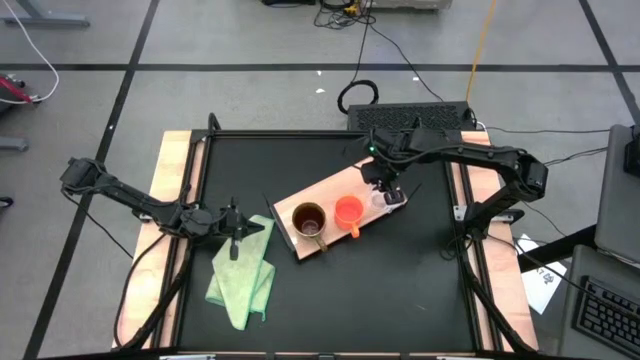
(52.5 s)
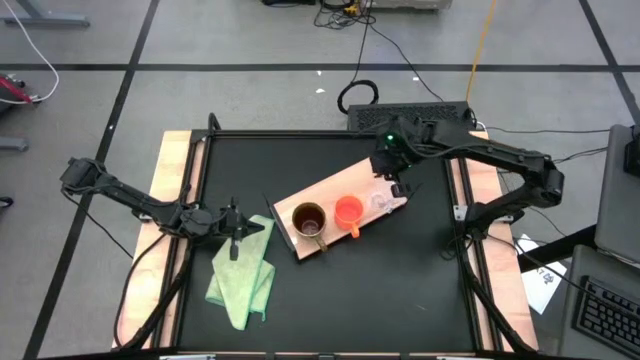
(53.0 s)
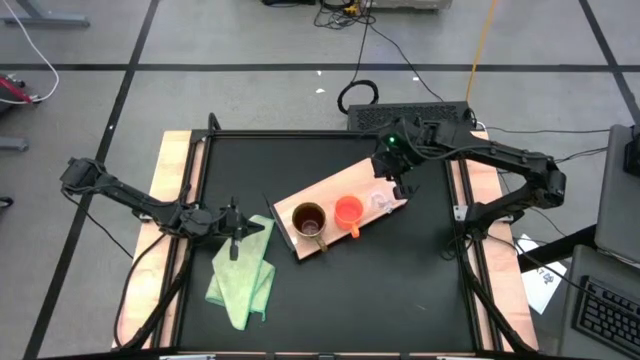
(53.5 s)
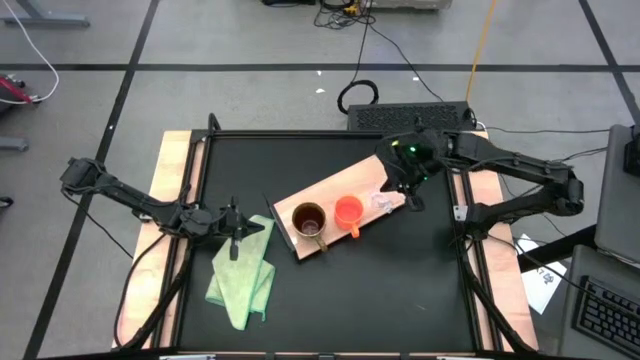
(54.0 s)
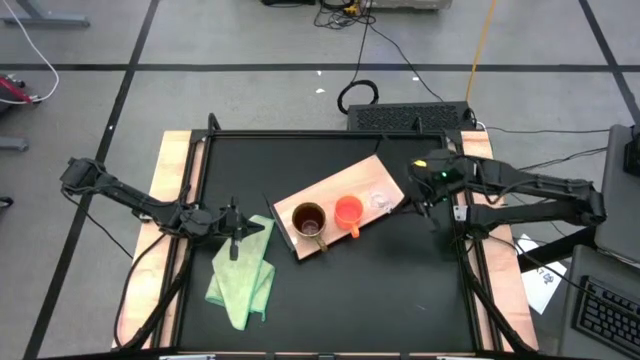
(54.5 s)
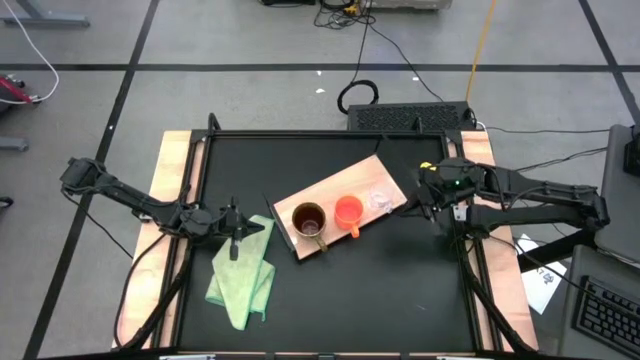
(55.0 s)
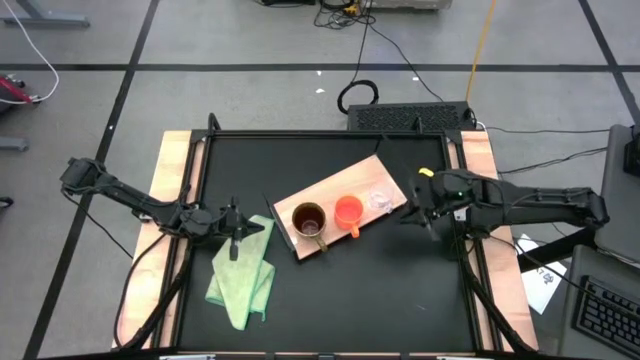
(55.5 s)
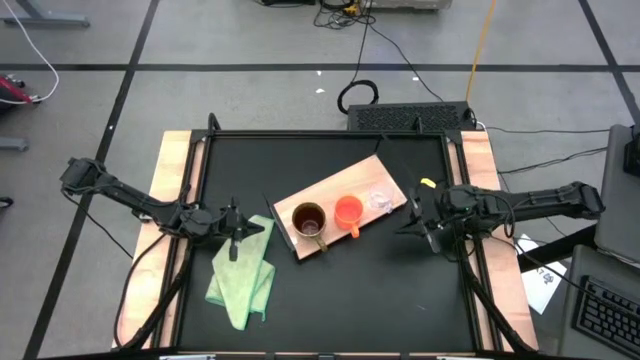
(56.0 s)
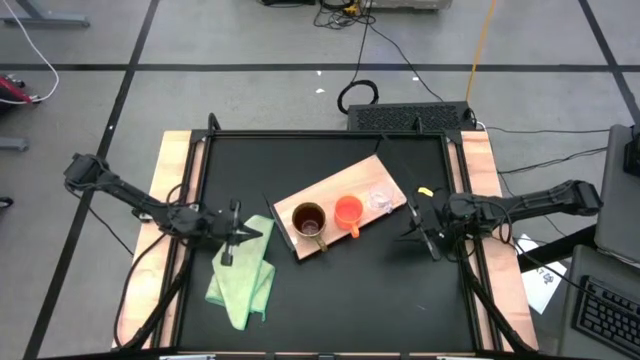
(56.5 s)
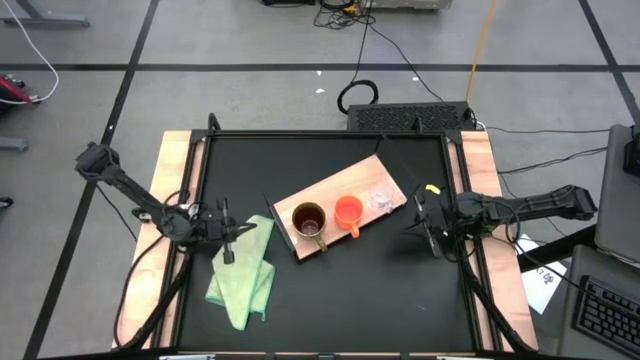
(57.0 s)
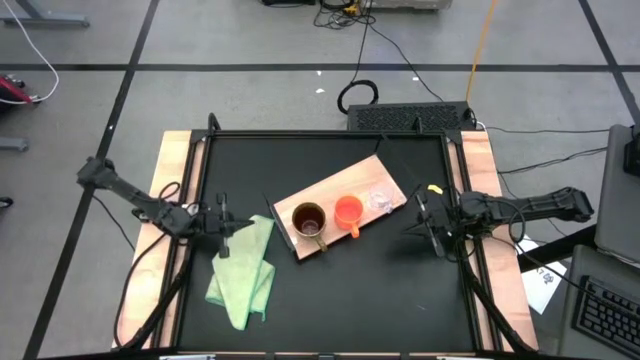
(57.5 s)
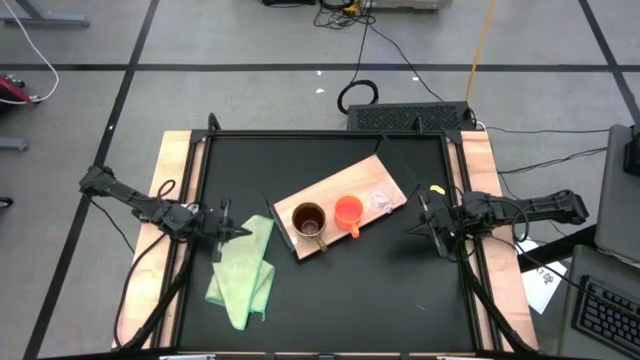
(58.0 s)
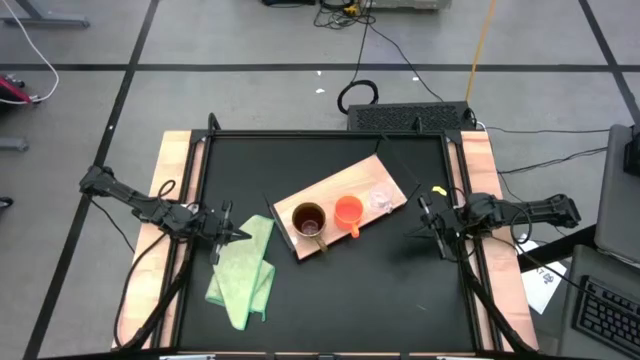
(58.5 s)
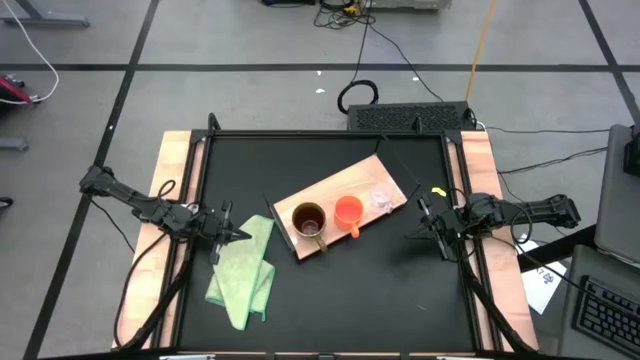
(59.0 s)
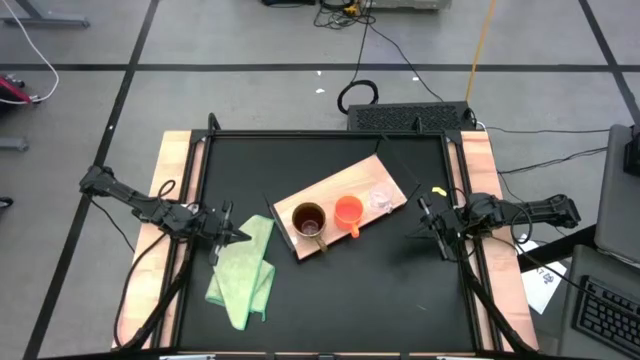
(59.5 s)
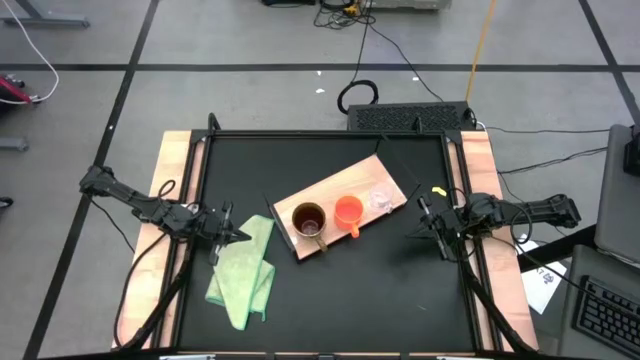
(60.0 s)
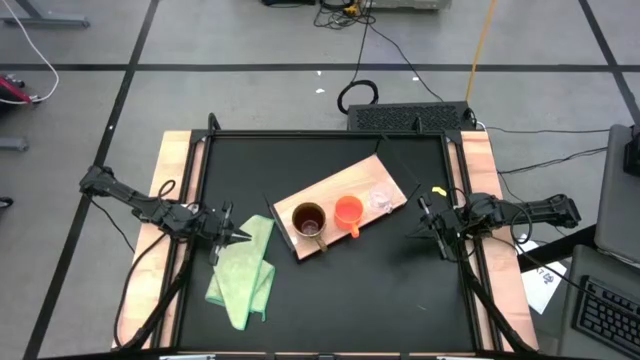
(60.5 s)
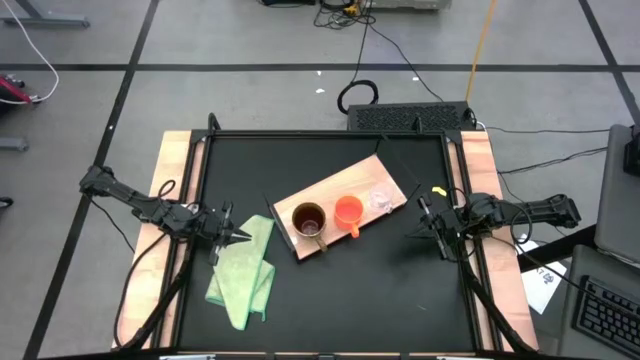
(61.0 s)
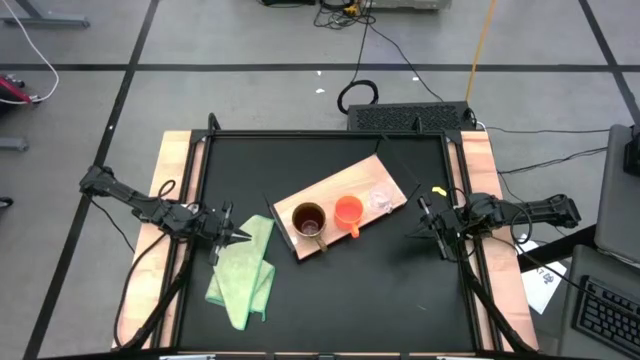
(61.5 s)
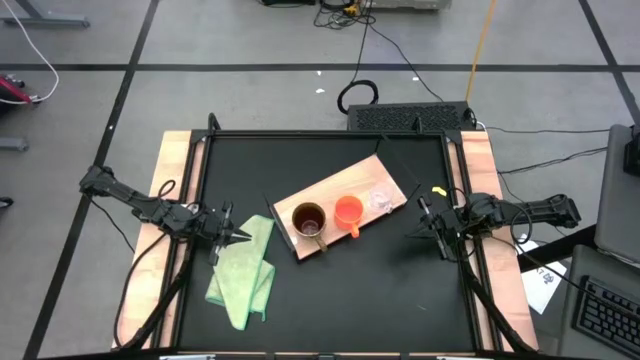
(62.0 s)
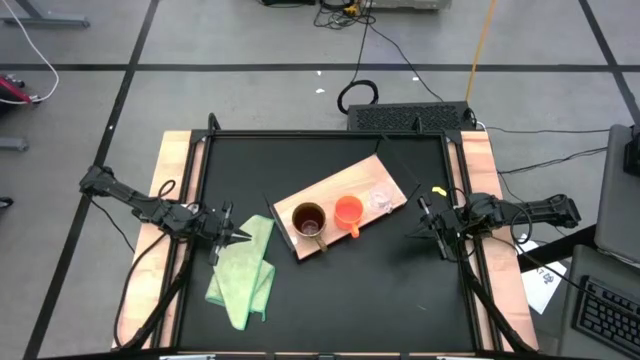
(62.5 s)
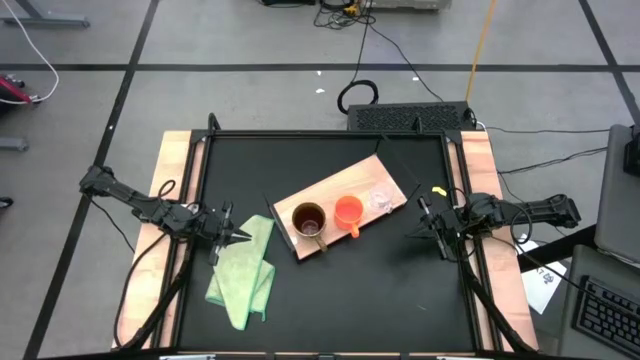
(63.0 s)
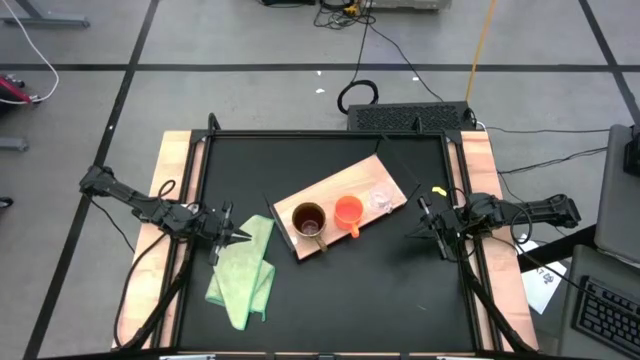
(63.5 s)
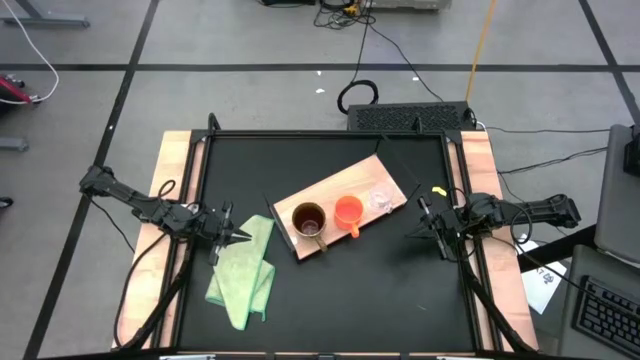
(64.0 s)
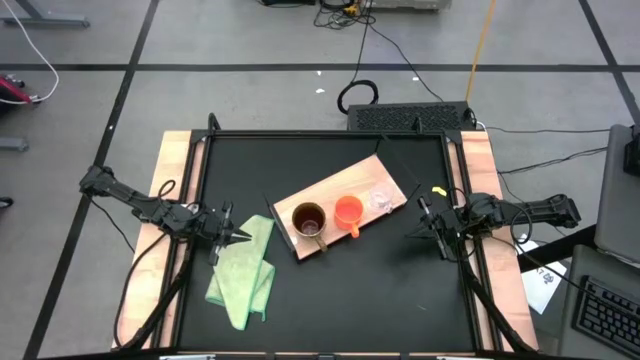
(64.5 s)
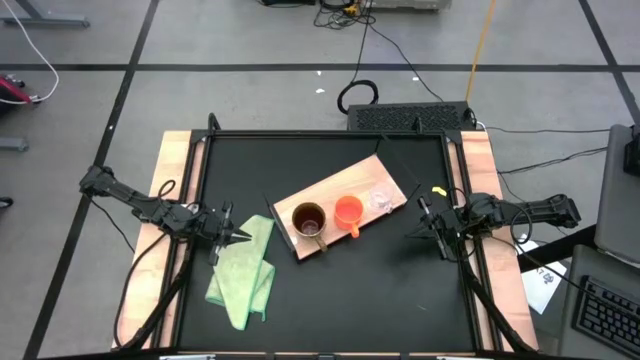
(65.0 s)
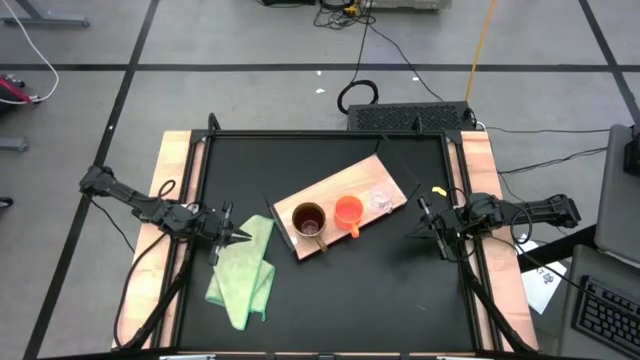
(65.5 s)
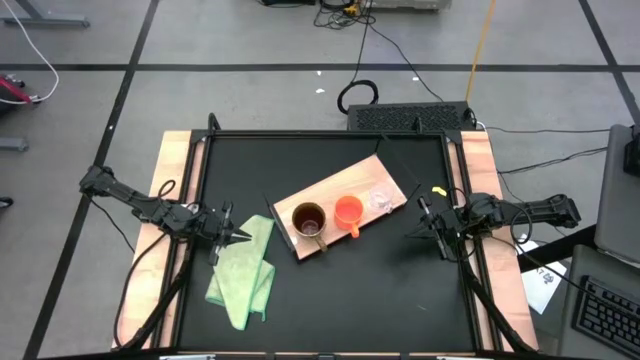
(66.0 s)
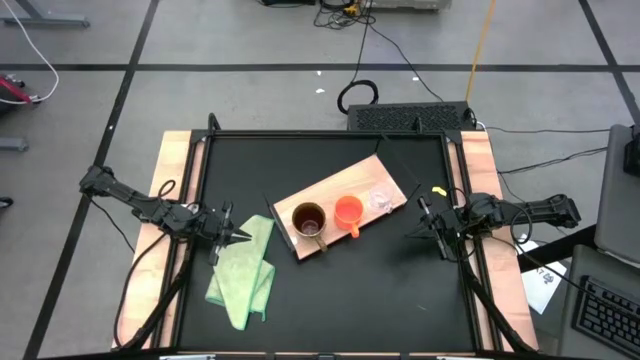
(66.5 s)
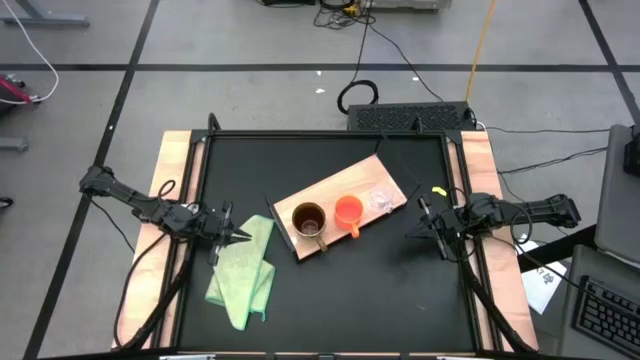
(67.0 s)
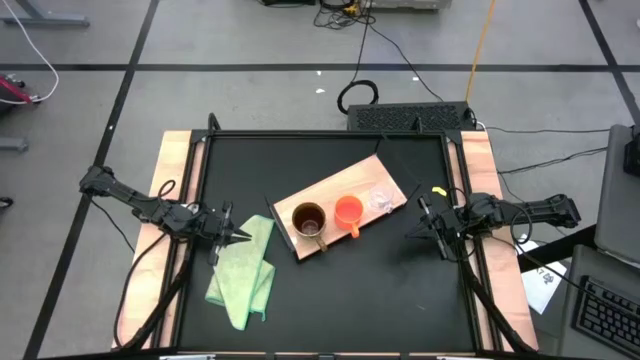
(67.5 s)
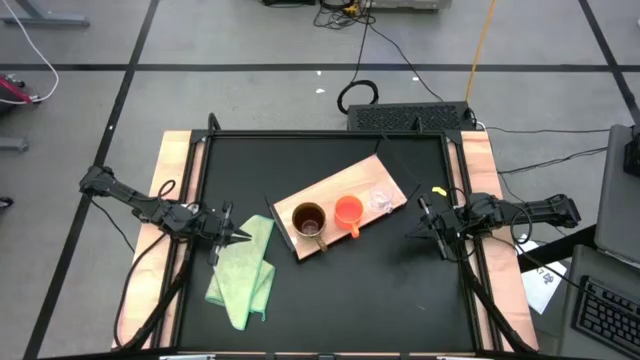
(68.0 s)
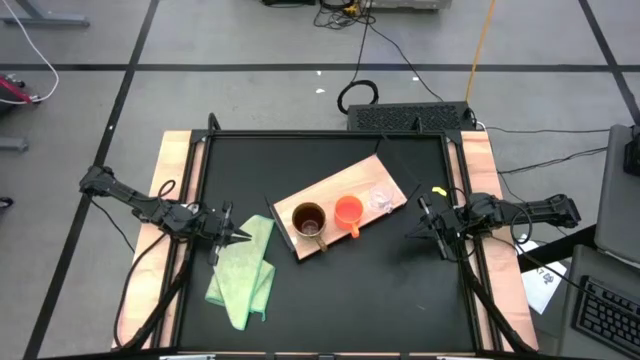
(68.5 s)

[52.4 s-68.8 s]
Task: Stack small to large cups/mugs on shelf
Return to Home Position

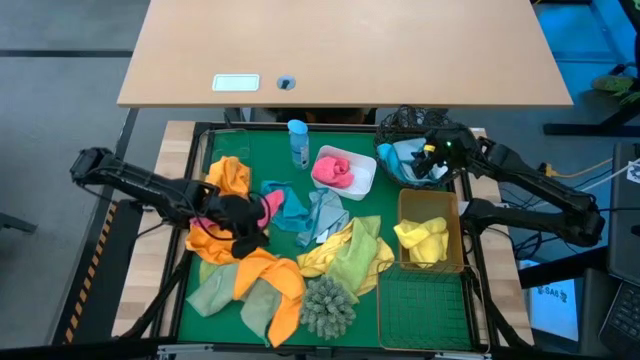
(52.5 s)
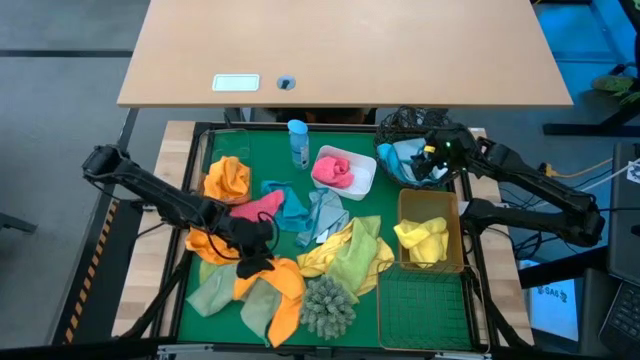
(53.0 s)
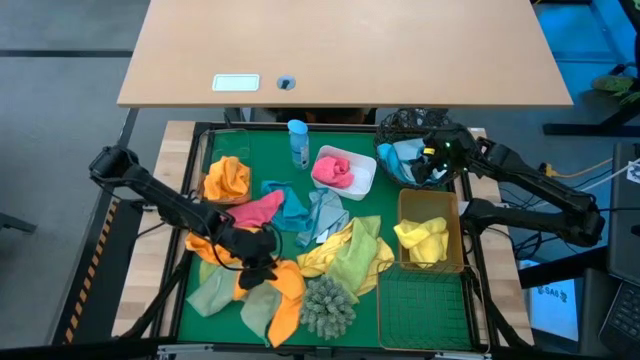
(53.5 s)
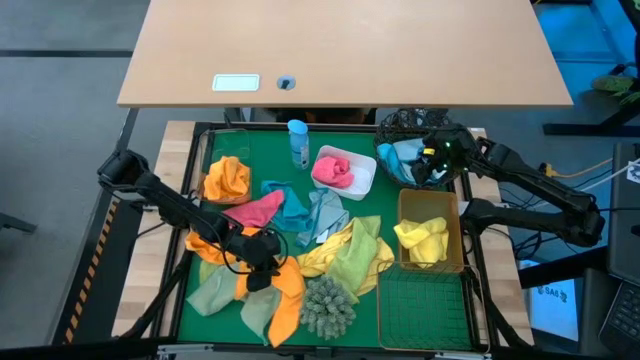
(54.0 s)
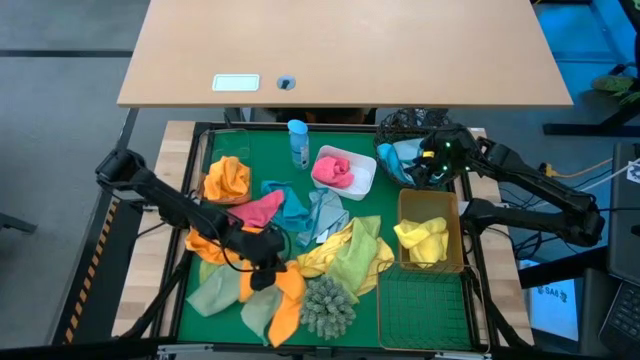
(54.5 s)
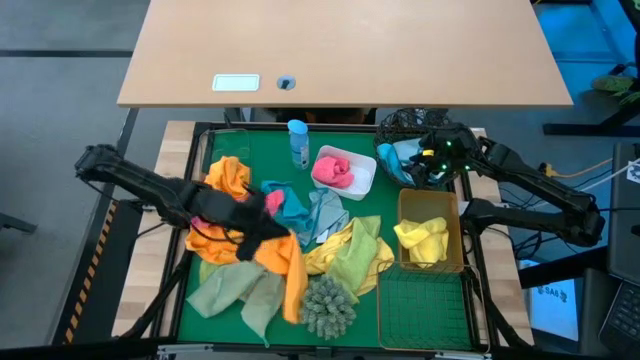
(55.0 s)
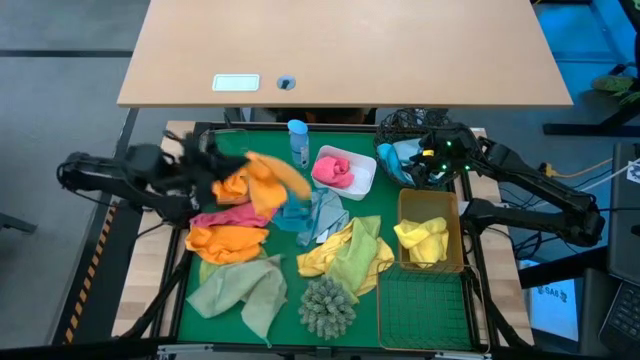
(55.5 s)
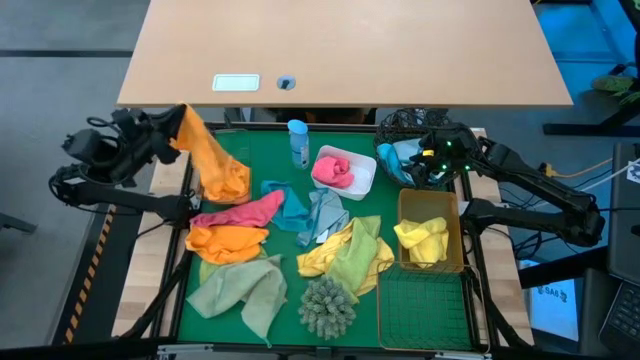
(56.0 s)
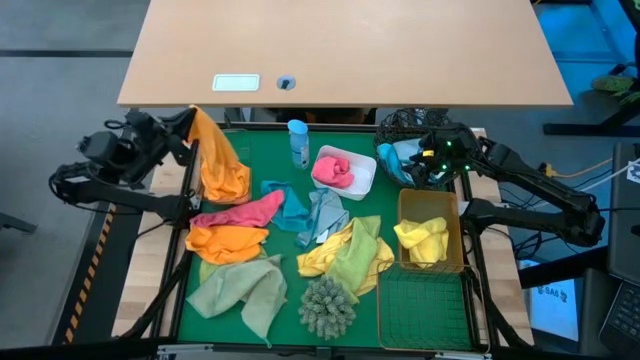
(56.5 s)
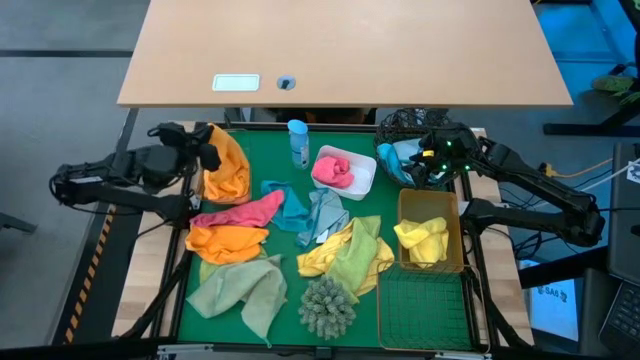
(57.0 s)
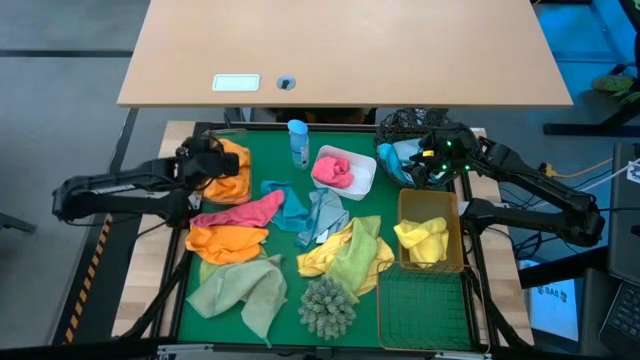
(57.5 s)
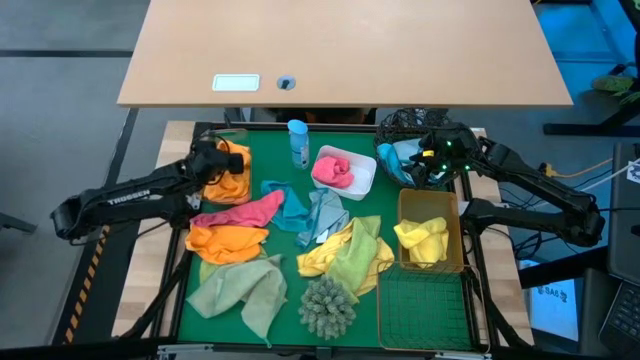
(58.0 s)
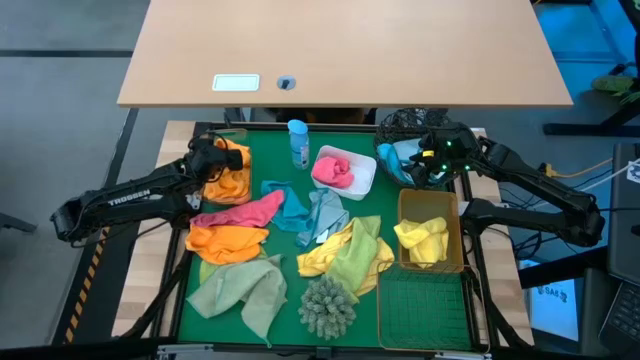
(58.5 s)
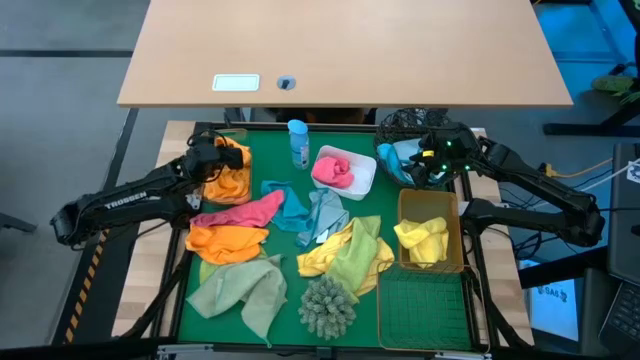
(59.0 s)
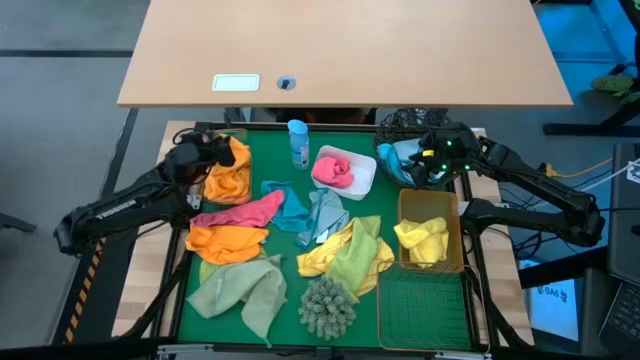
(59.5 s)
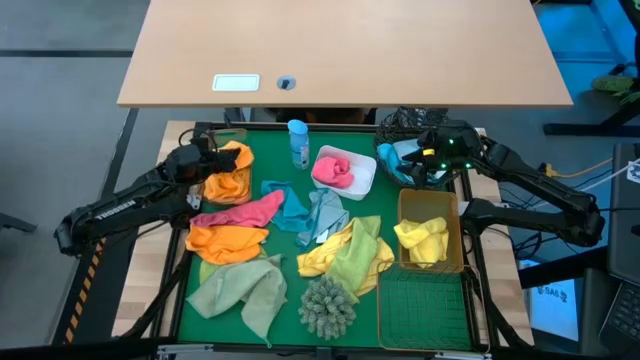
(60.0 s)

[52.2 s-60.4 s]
Task: Sort microfiber towel by color & place in baskets
Put the orange microfiber towel into the transparent bin
